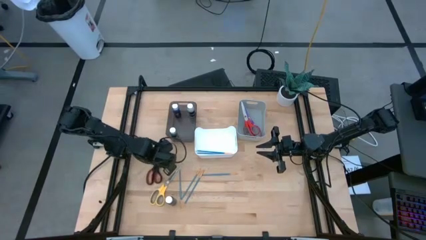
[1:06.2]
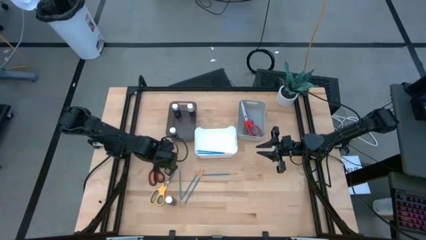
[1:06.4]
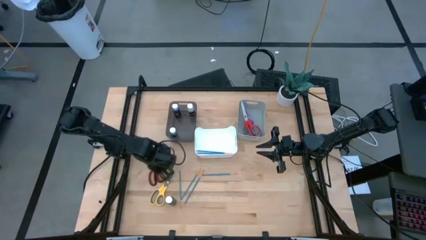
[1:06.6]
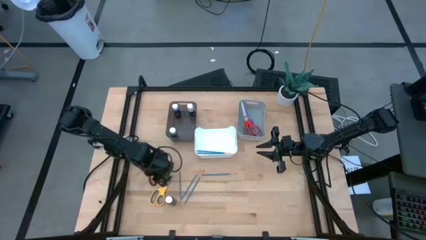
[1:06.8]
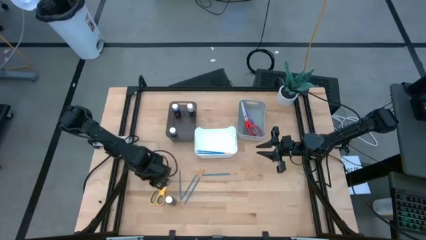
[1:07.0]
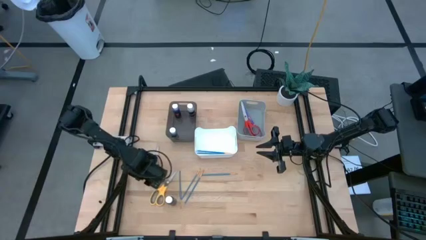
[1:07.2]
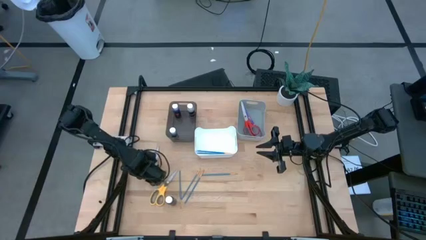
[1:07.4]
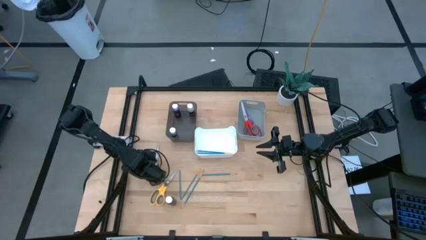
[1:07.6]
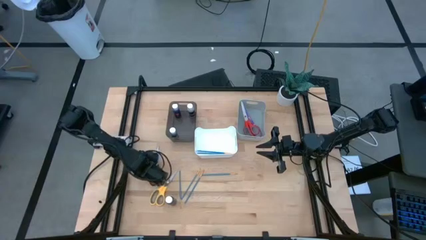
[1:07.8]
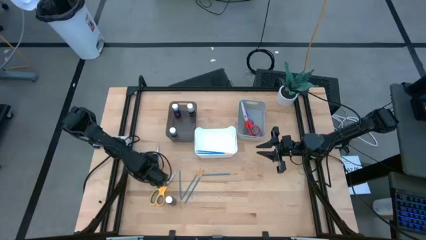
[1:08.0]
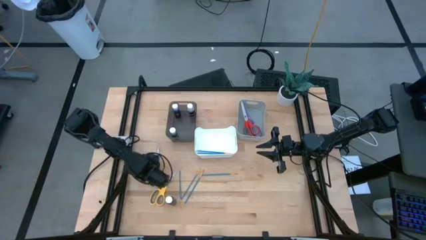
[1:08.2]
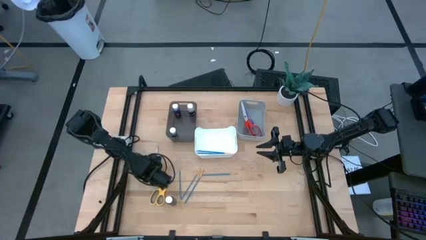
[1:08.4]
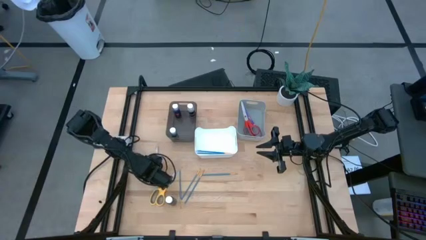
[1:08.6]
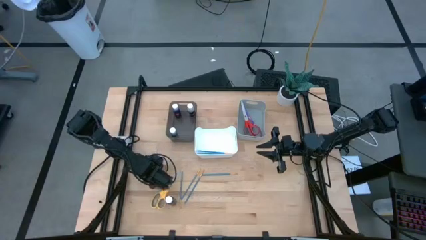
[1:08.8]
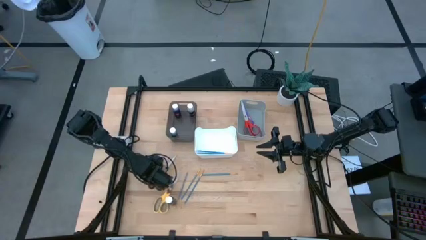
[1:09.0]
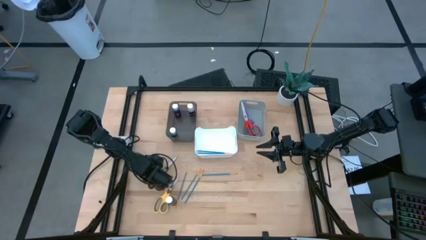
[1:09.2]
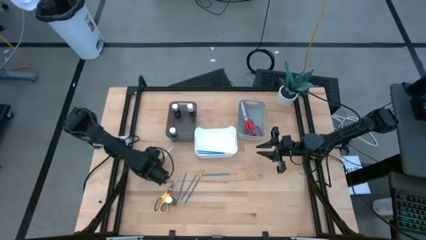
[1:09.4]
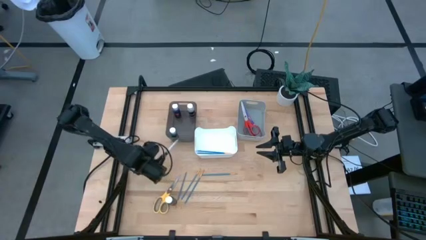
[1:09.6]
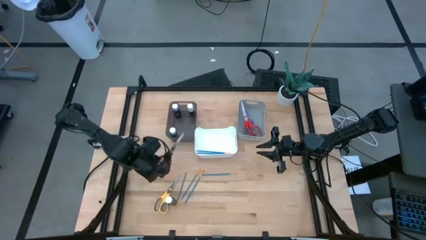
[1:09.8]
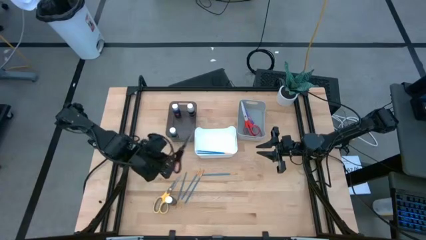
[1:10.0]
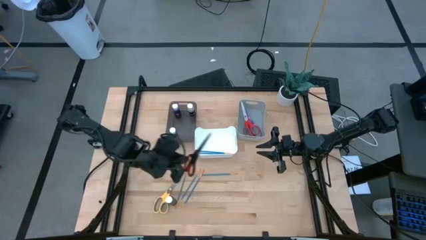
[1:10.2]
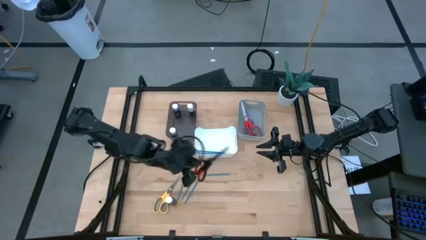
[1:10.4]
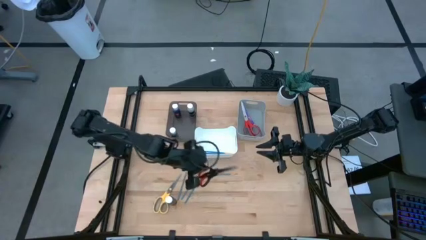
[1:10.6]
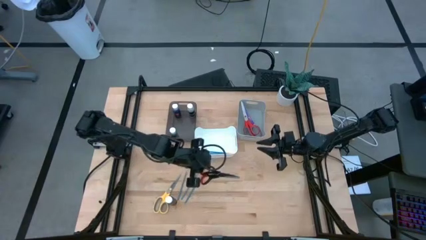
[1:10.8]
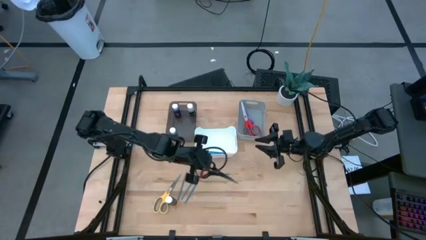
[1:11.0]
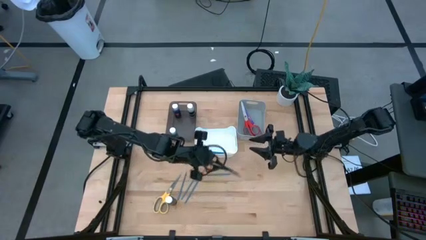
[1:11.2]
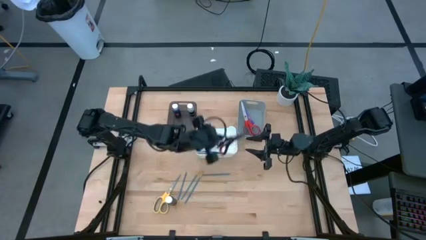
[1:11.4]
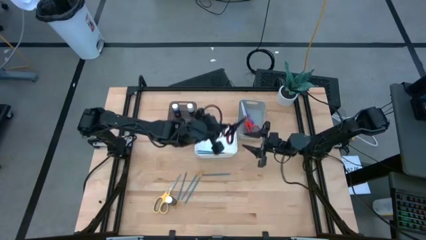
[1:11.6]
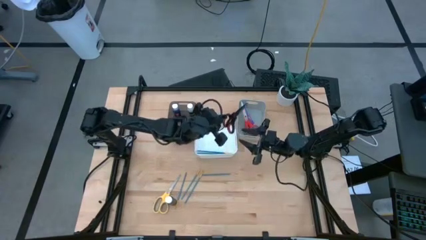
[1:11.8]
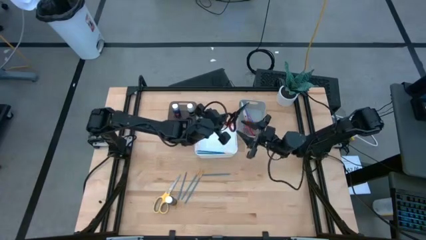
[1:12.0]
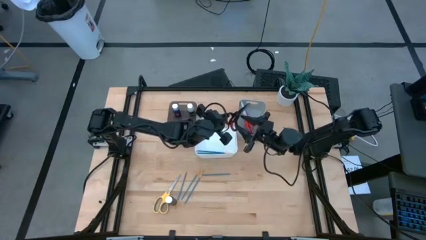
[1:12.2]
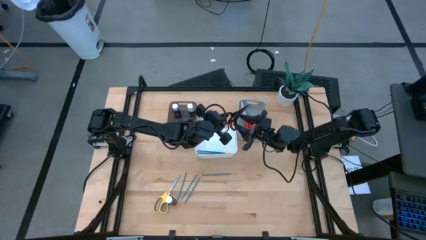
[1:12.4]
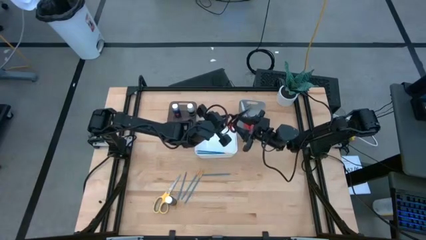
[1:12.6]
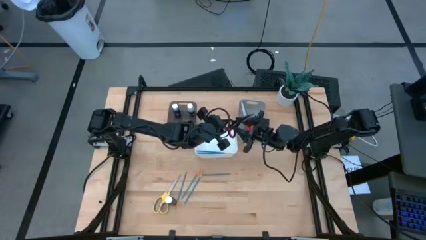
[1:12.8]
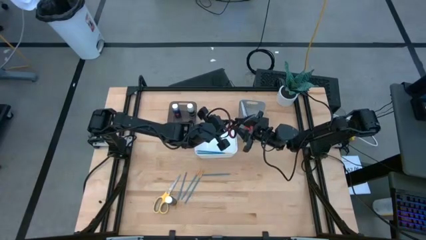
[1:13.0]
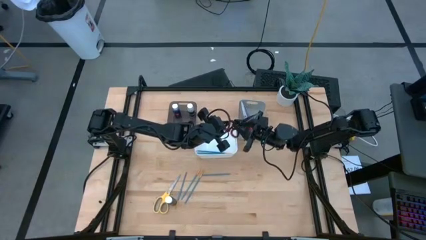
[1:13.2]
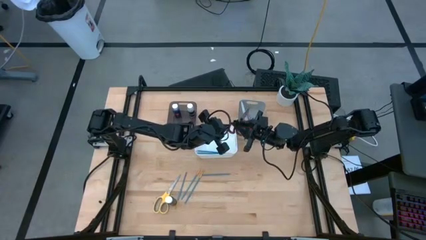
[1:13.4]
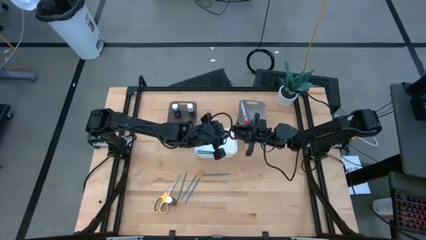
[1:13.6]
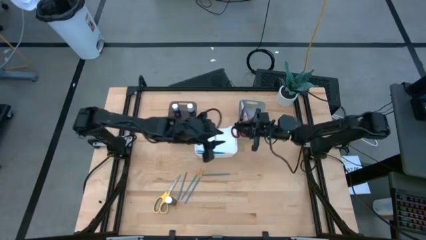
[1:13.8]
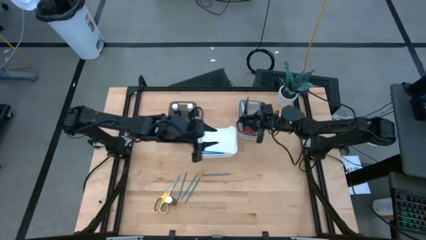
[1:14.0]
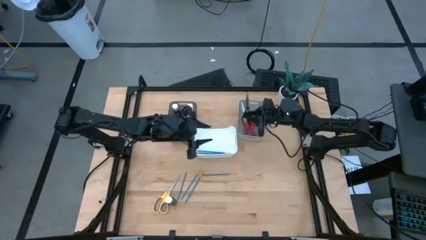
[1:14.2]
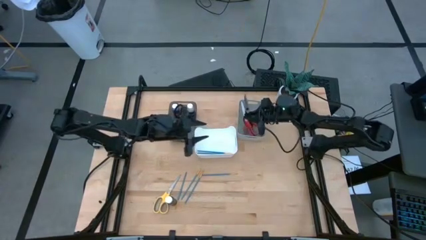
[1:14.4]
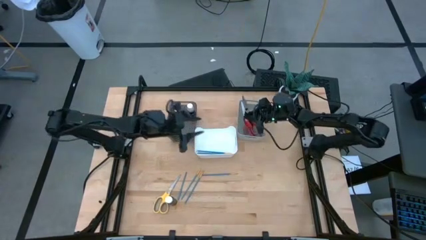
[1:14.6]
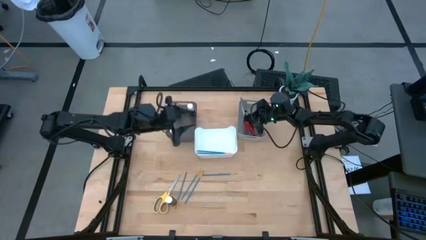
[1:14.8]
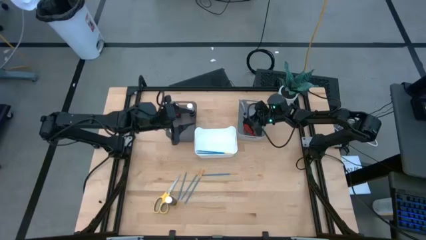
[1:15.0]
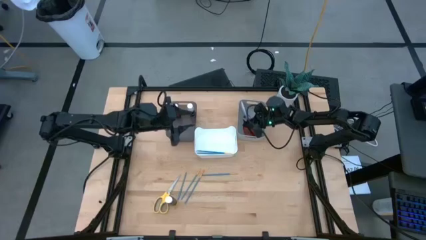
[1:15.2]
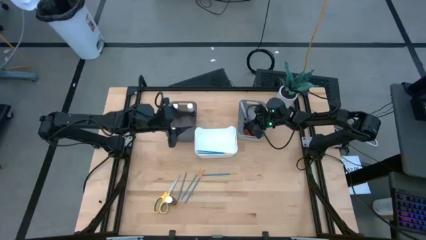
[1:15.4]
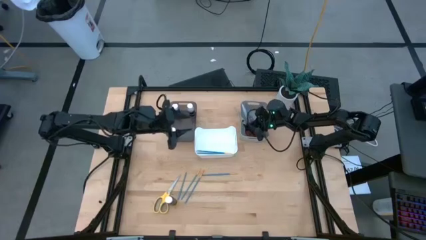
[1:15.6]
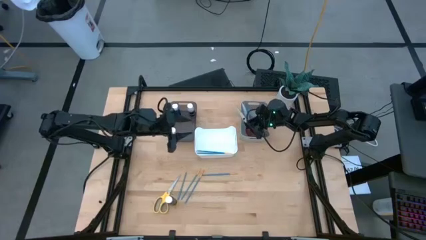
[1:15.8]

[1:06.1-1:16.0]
Task: Pick & Place Paint Supplies
Put the black scissors into the gray bin

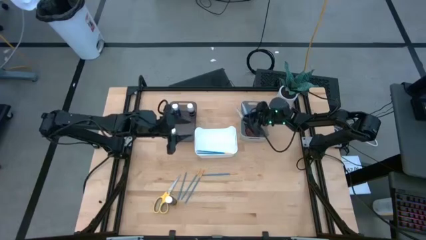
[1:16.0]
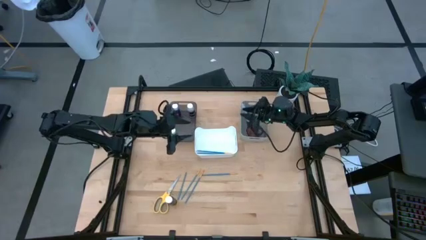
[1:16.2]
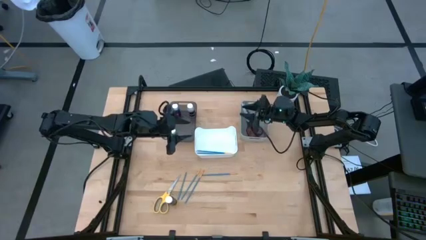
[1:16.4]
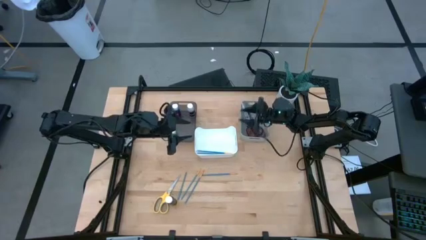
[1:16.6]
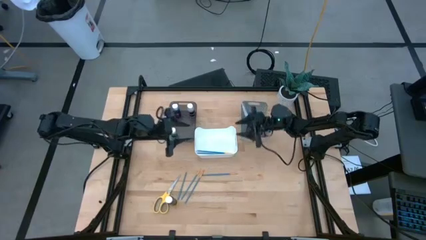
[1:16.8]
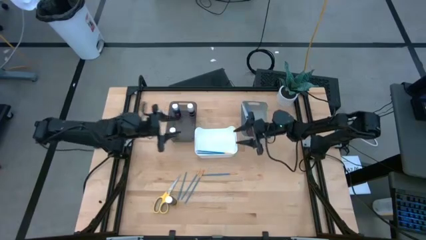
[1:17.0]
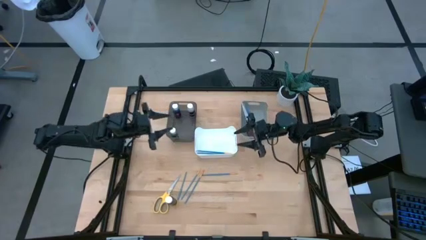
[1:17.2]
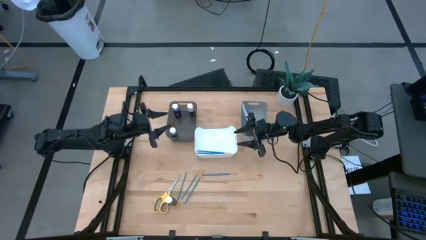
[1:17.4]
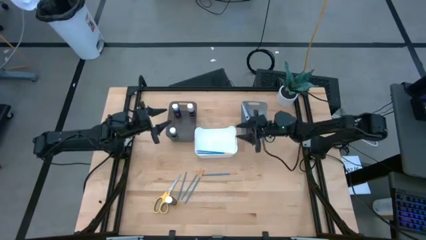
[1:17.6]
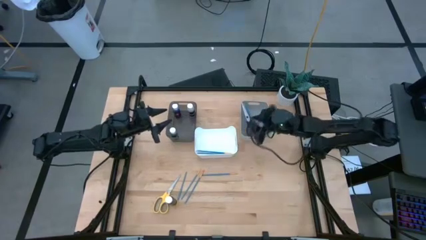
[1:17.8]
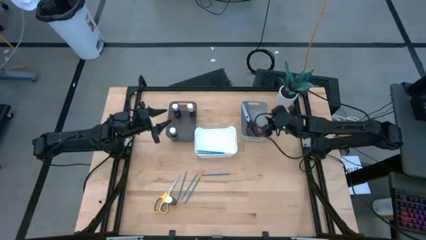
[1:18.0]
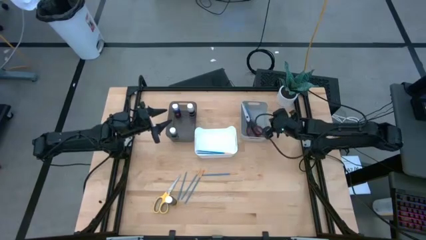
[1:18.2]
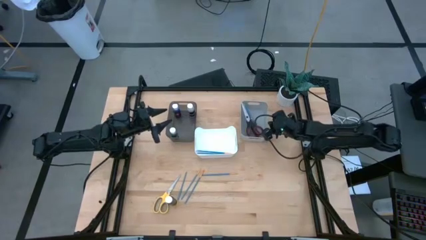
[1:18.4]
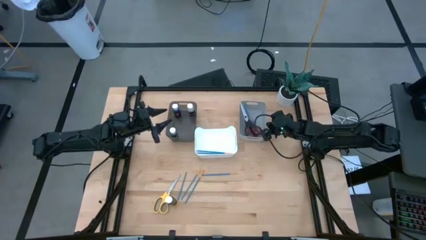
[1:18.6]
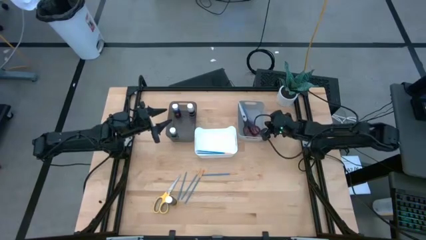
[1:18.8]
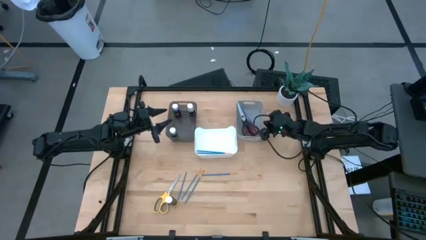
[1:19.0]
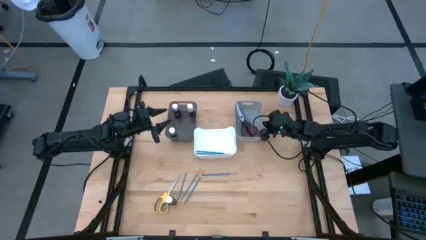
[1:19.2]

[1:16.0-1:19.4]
Adjust the gray bin

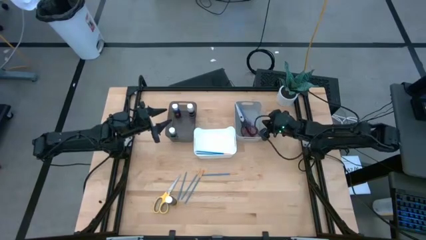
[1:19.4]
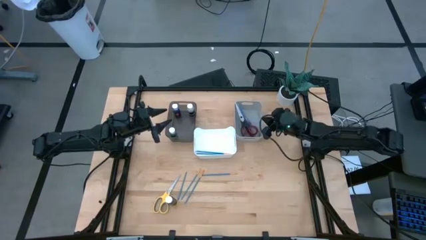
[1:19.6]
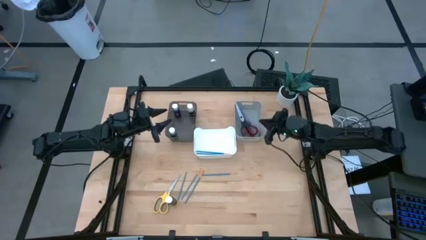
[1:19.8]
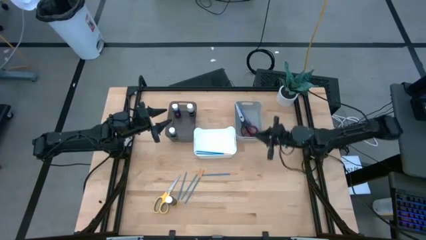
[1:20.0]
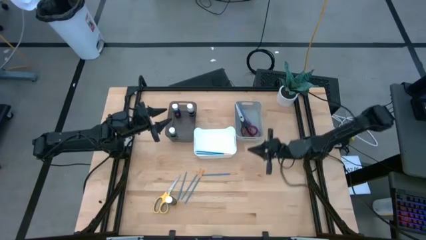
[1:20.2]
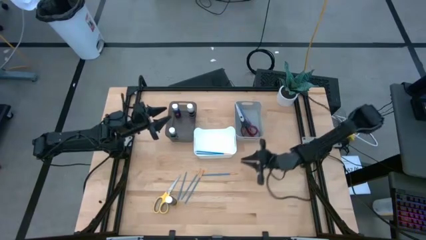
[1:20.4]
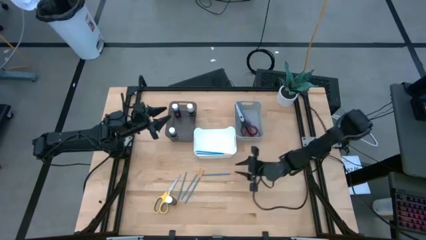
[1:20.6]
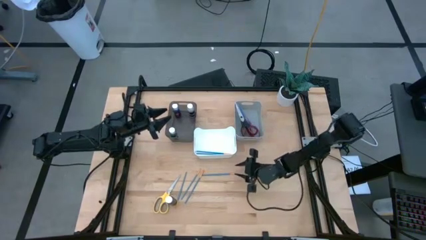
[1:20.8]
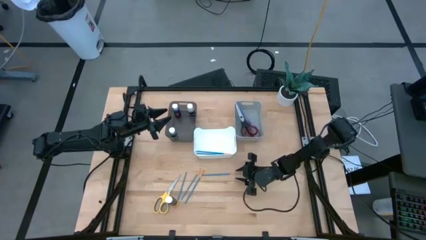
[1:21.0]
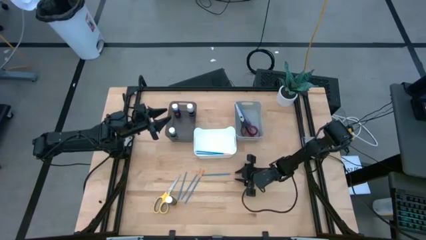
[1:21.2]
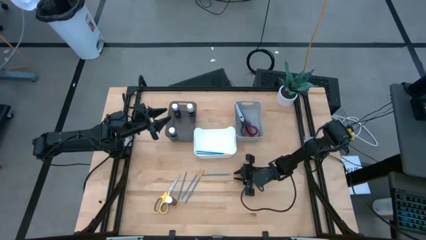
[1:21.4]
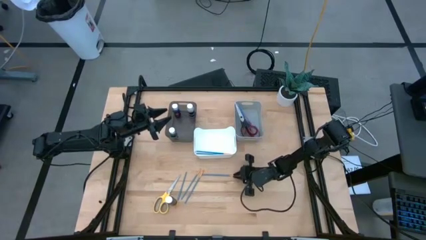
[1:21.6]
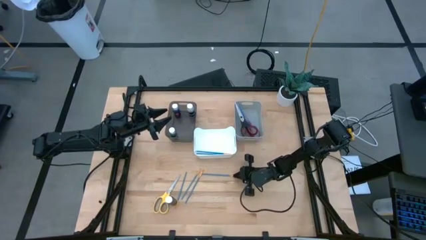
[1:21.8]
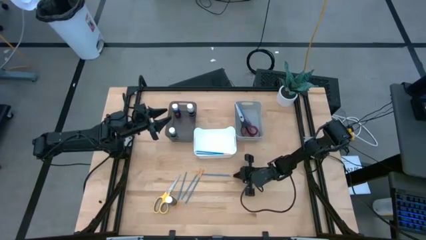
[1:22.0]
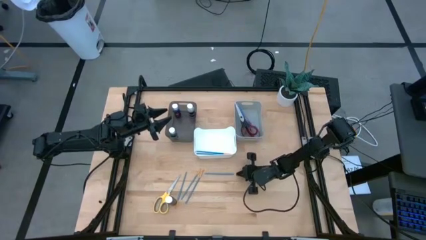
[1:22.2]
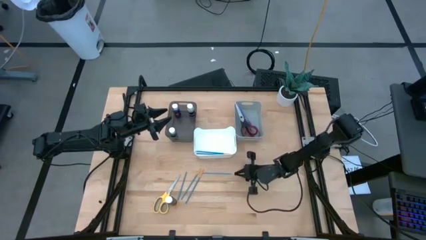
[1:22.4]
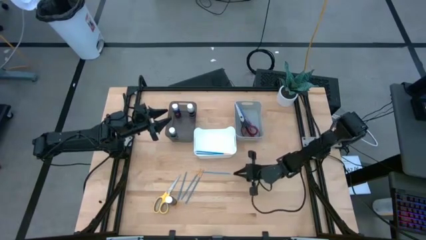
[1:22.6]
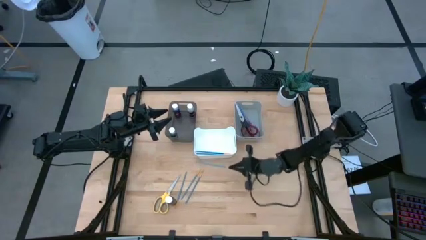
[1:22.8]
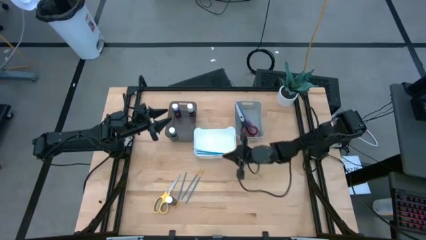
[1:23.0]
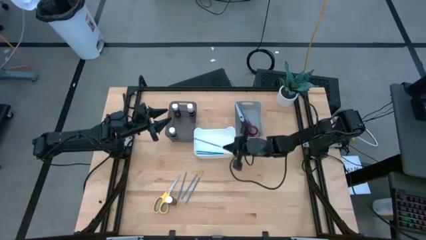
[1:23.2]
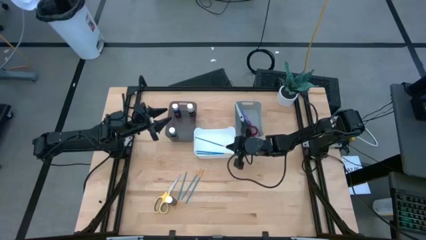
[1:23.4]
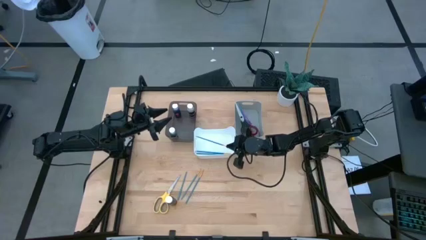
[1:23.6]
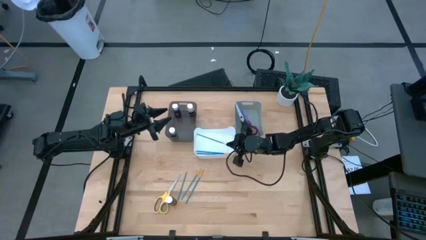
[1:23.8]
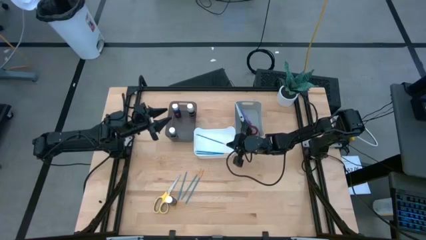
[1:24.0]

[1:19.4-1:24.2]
Put the blue paint brush into the white bin
